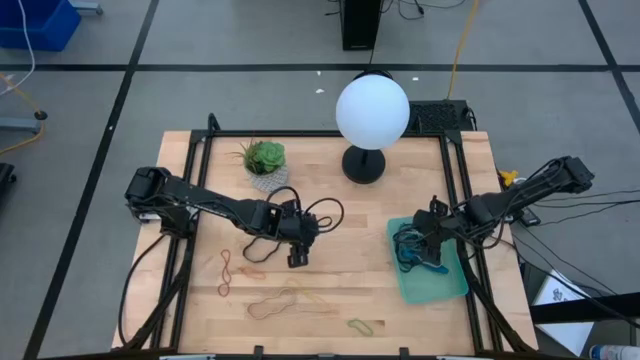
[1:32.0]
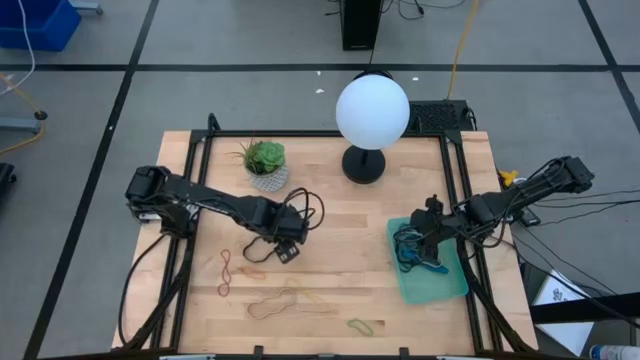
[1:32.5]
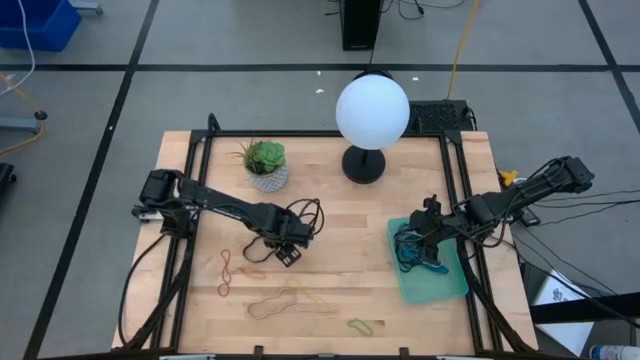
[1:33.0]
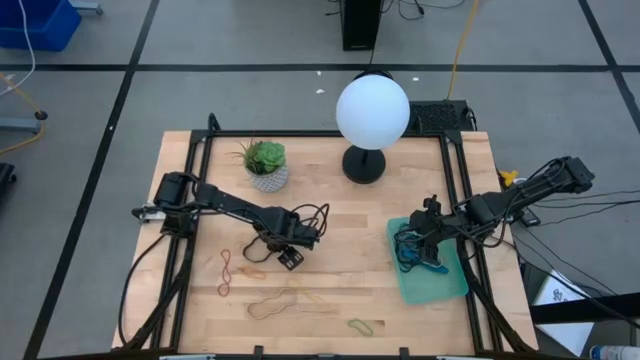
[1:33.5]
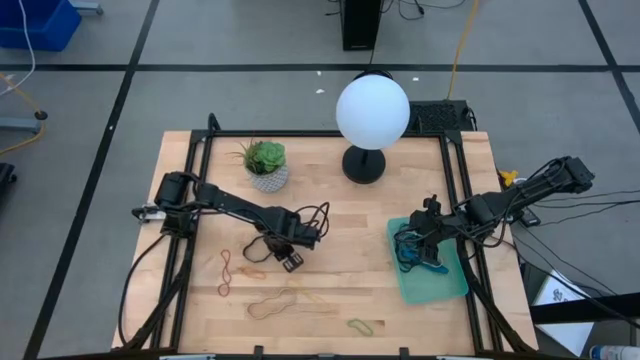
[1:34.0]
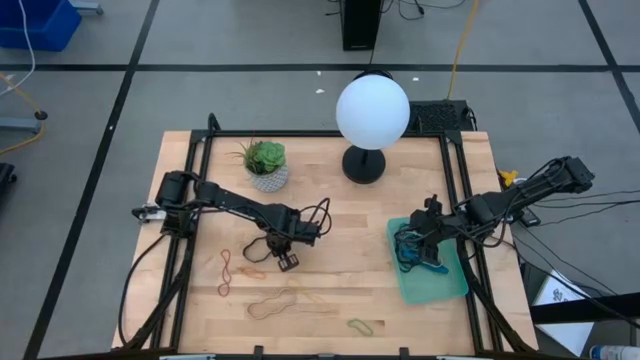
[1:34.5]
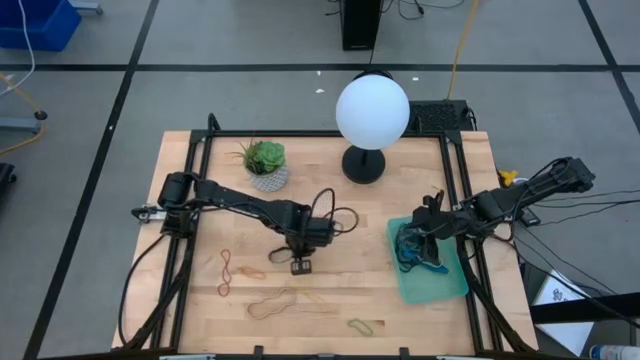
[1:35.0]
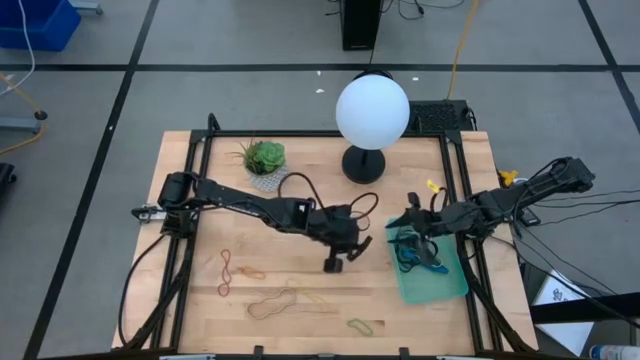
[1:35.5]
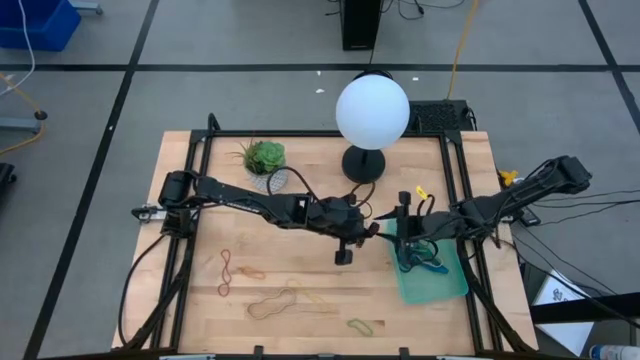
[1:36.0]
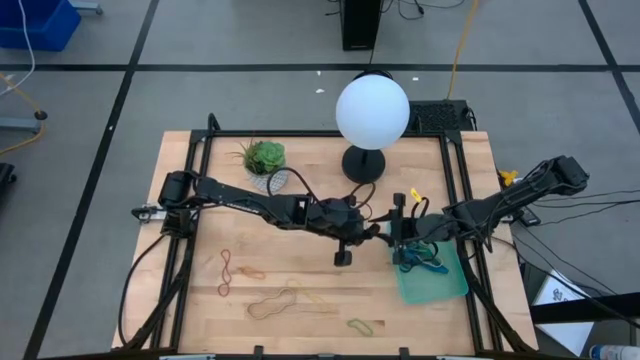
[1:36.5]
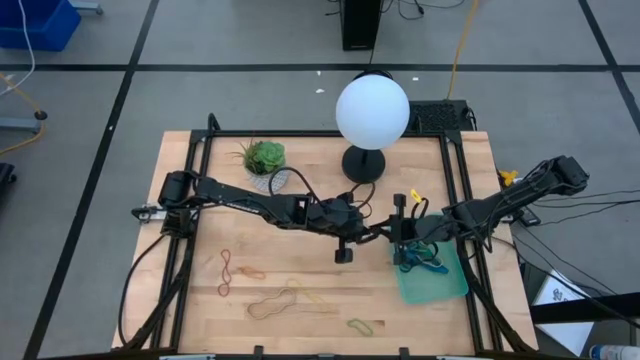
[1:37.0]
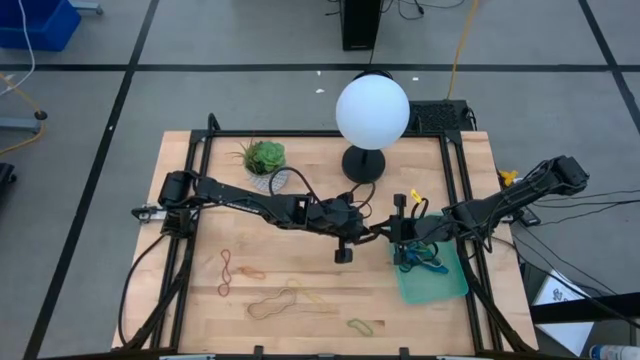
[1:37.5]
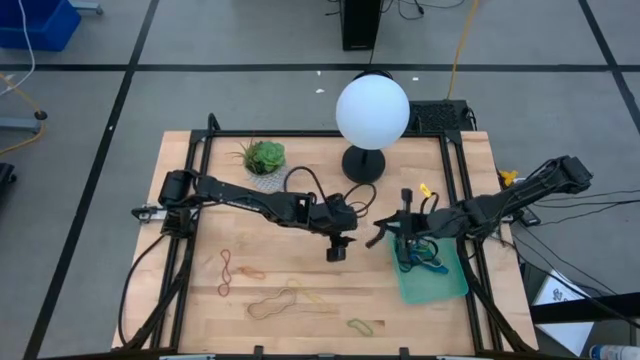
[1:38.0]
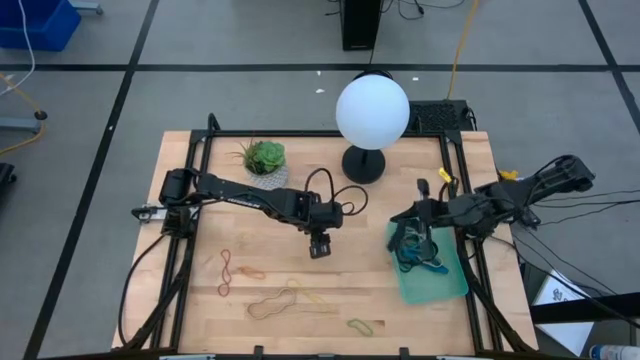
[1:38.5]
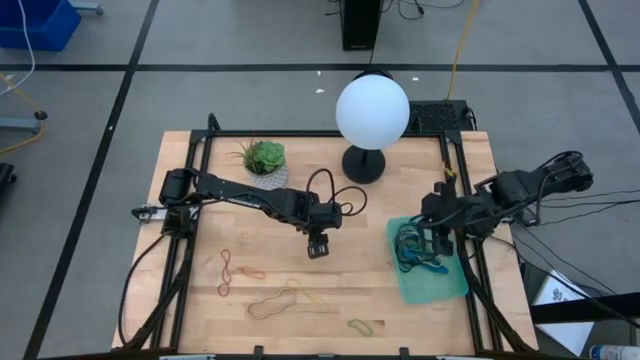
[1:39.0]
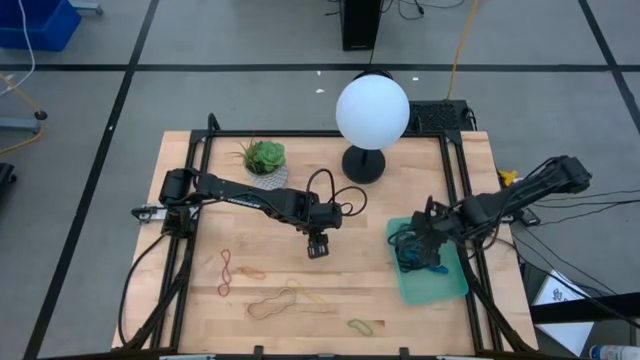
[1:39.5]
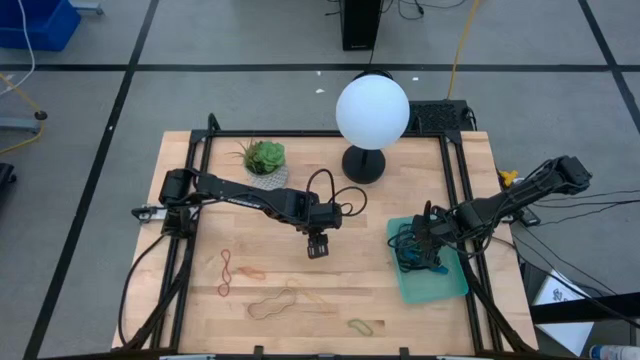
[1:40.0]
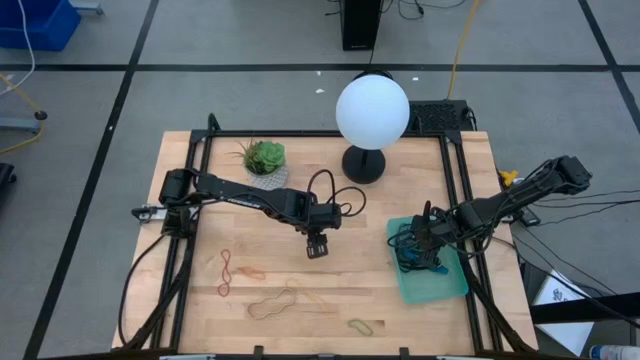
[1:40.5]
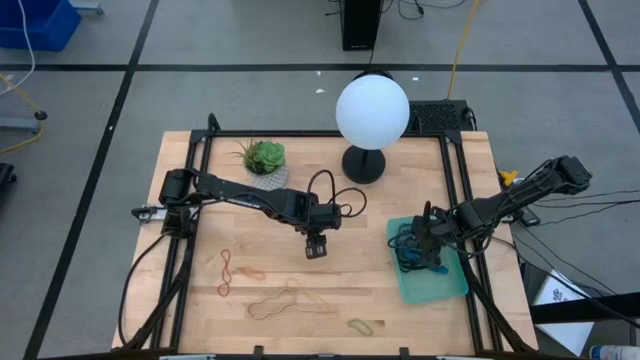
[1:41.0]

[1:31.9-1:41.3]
Task: Pick and place rubber bands into bin
Put the black rubber band into the bin

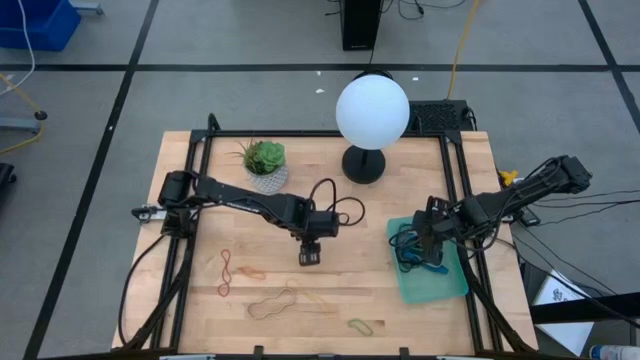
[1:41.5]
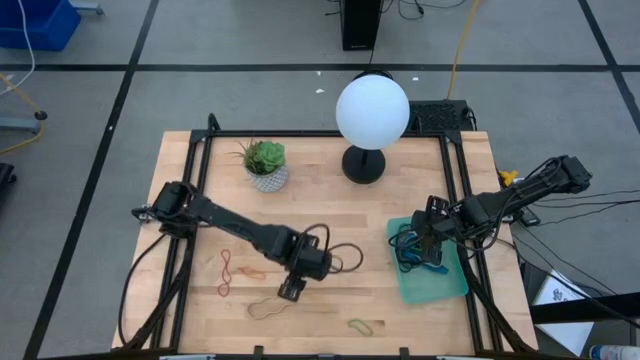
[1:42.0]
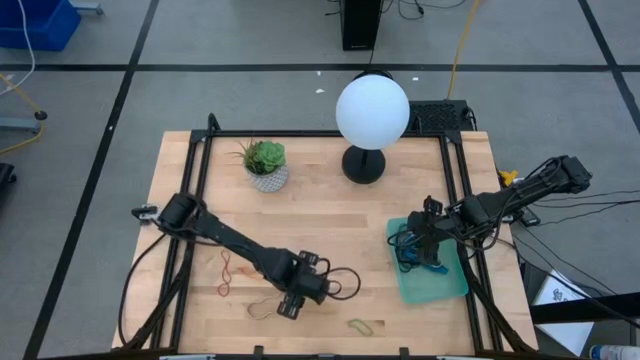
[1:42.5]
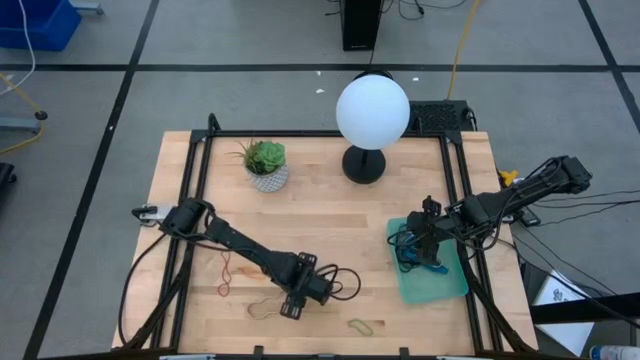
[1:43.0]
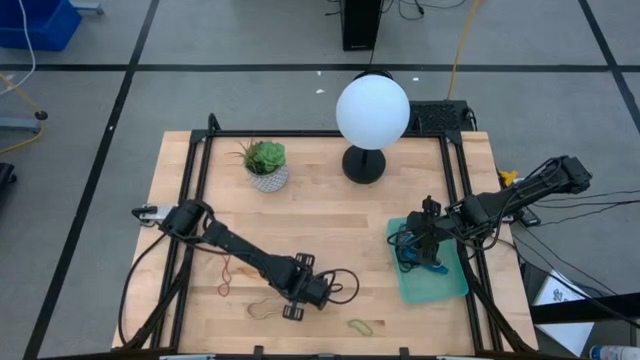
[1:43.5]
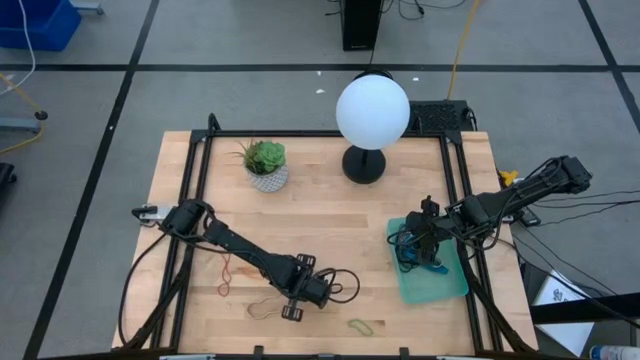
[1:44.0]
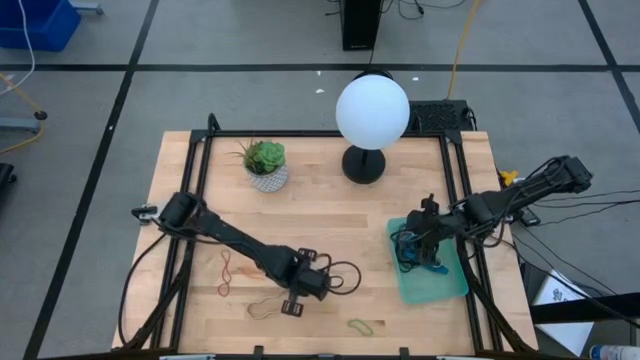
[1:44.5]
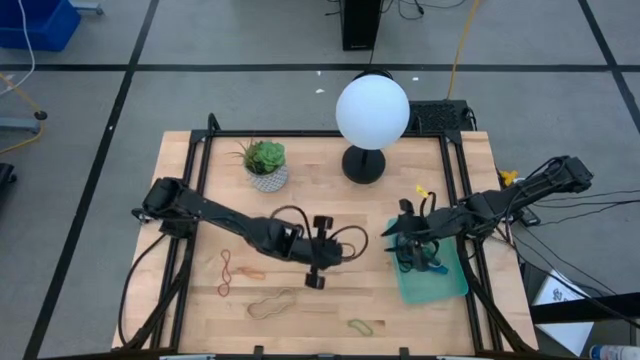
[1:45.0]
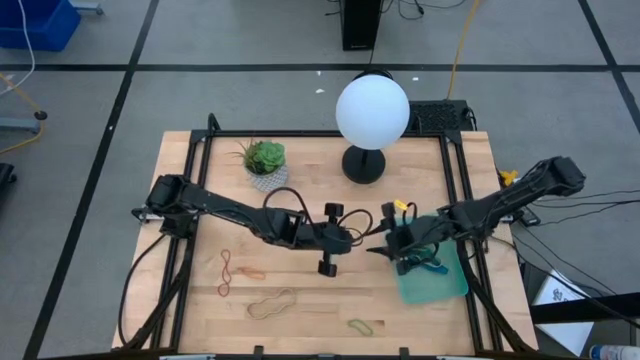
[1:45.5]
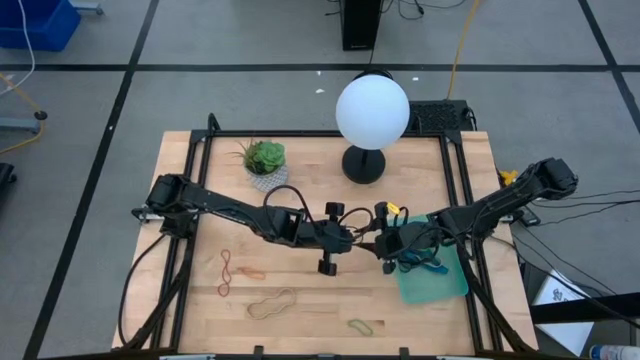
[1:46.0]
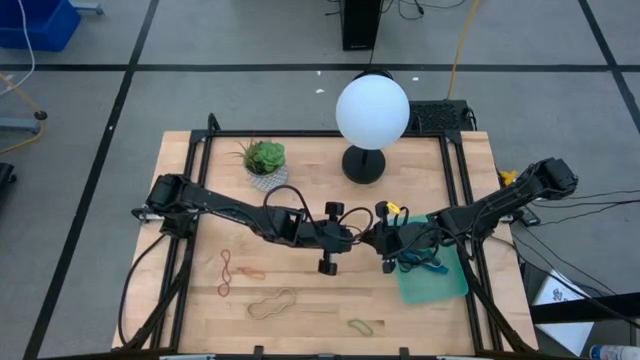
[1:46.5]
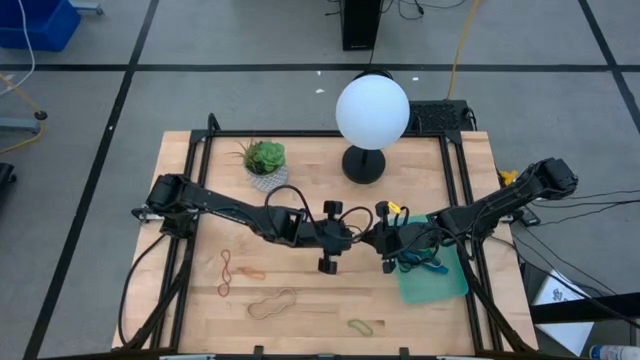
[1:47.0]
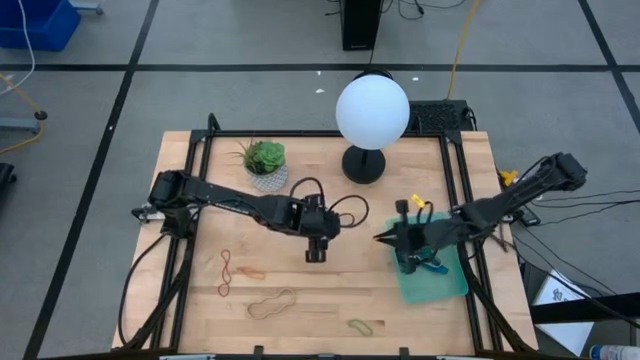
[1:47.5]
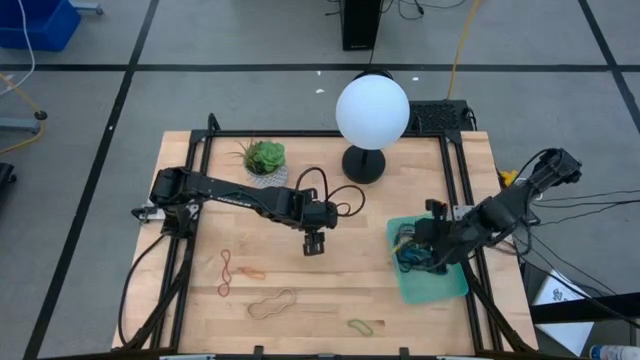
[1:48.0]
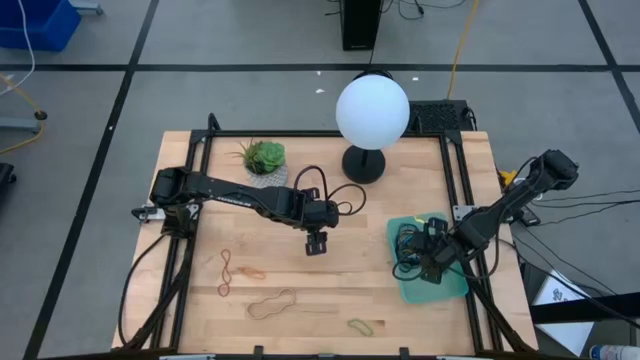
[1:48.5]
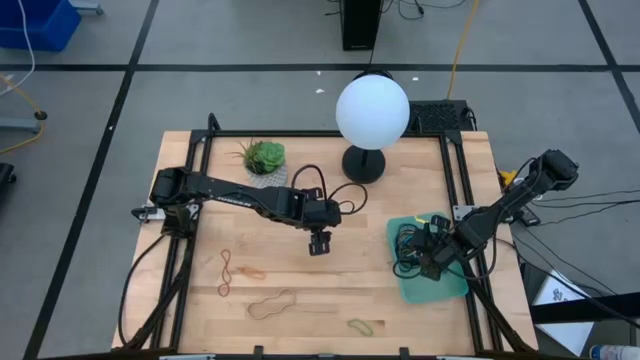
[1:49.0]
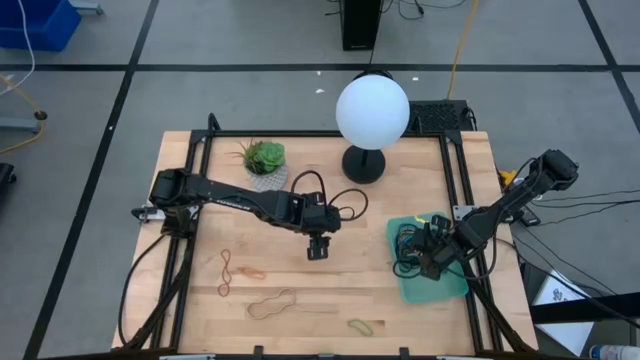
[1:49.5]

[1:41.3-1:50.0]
Put the yellow rubber band into the bin

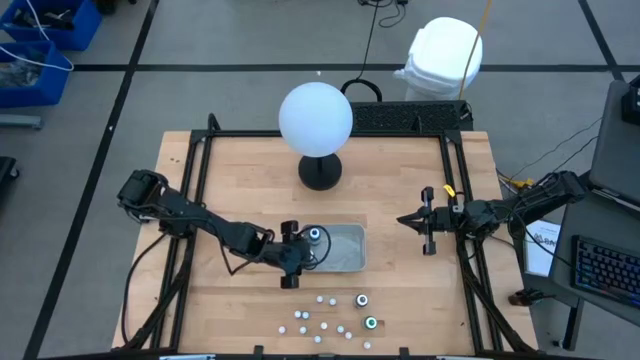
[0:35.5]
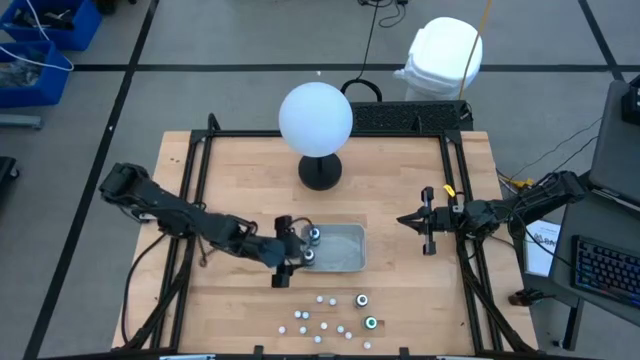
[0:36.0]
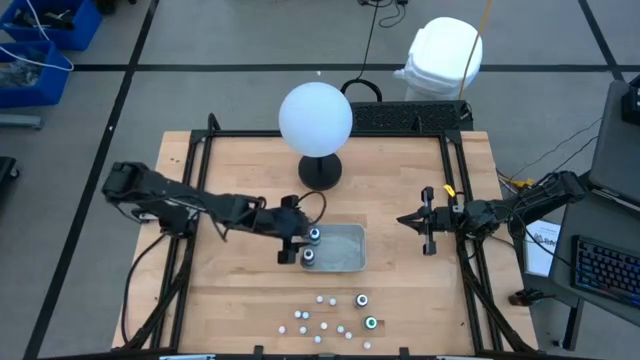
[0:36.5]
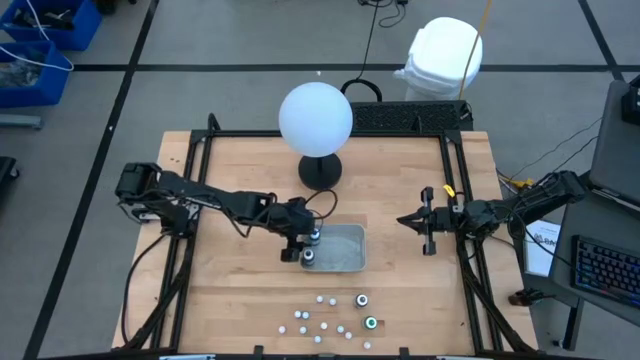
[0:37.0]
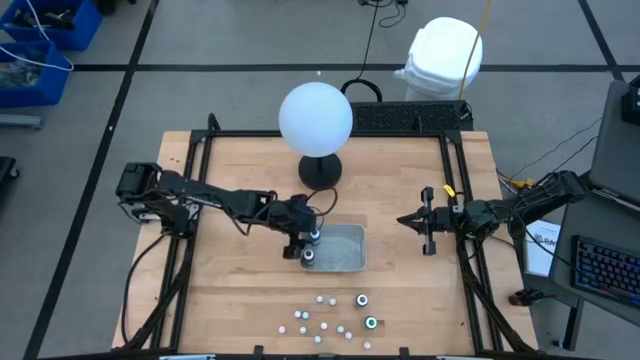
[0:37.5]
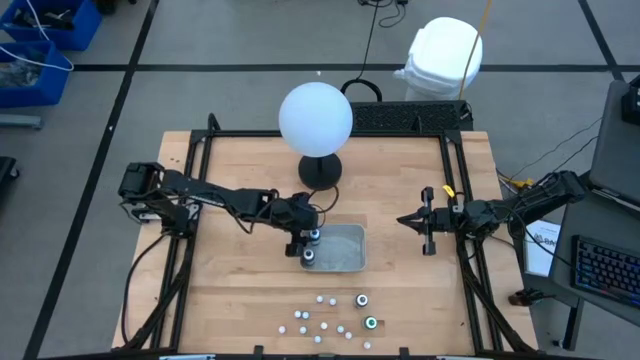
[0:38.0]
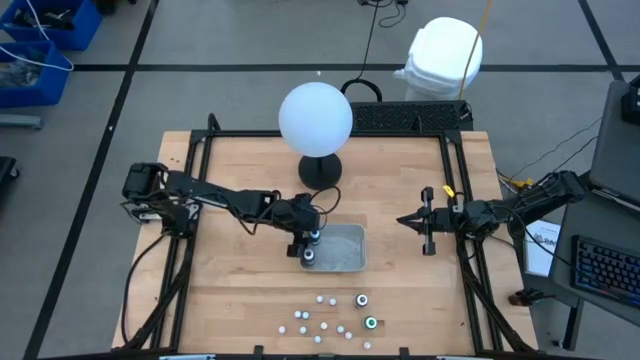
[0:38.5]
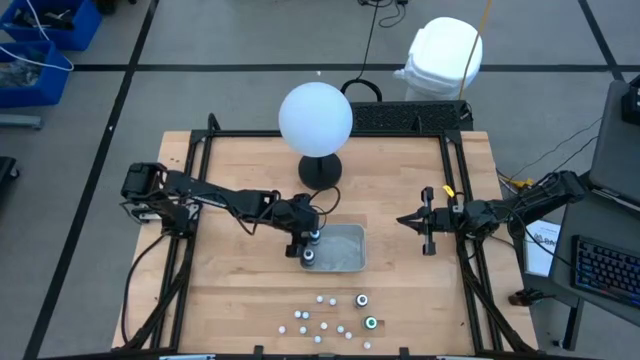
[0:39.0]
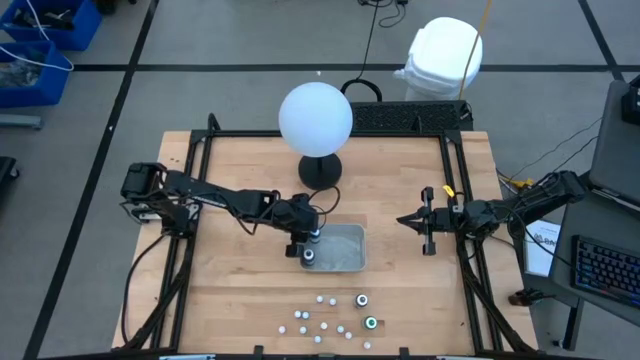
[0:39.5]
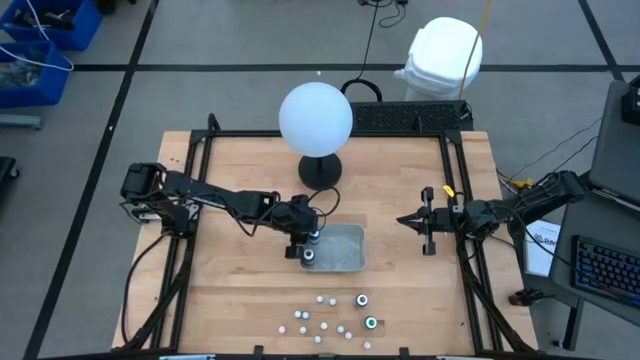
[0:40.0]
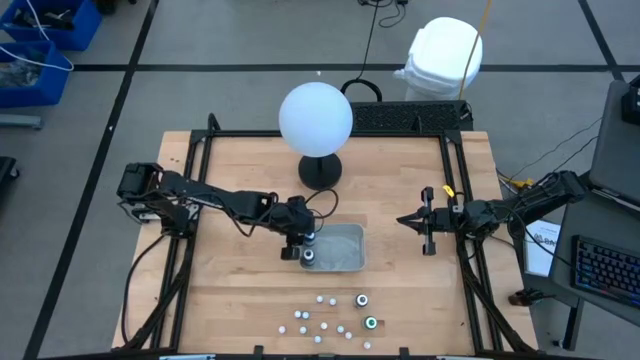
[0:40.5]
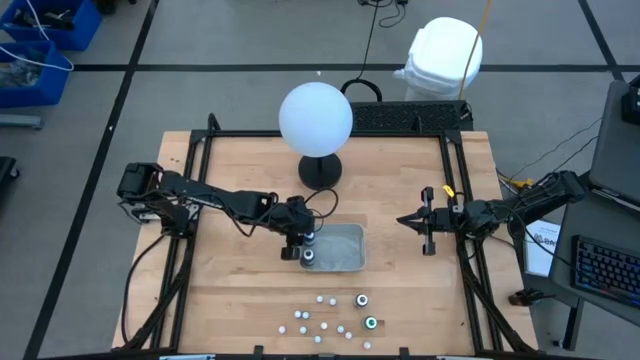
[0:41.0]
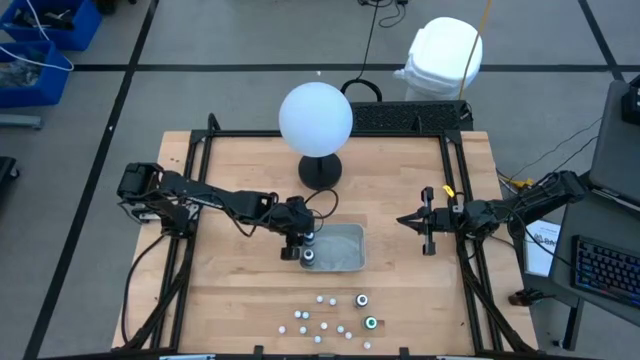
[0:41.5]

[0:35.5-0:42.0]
Task: Pick & Place food coloring
Adjust the large blue food coloring bottle on the gray bin
